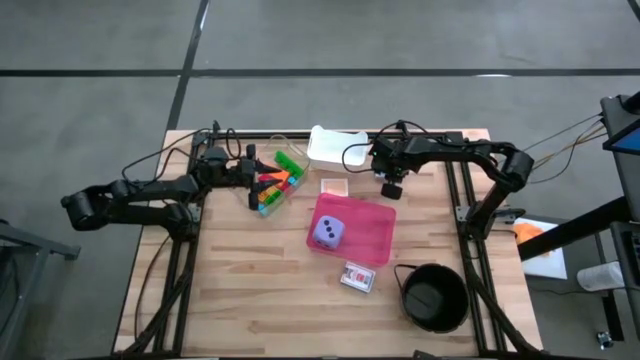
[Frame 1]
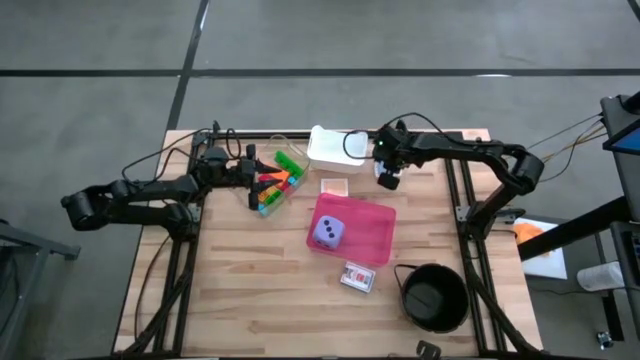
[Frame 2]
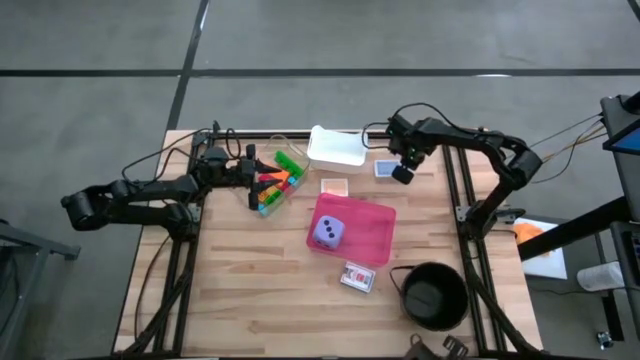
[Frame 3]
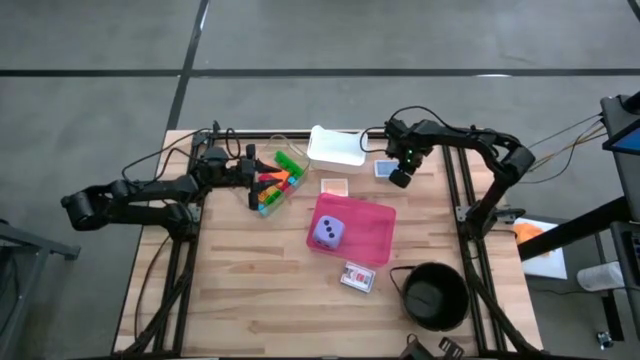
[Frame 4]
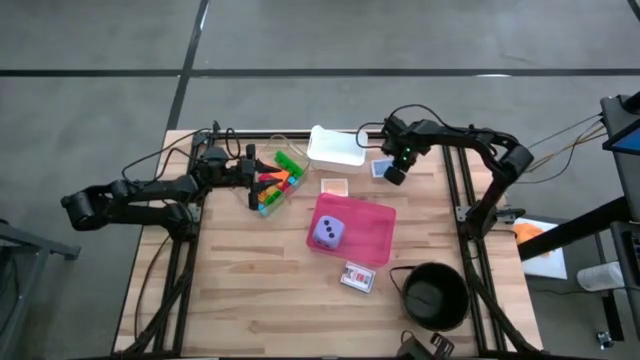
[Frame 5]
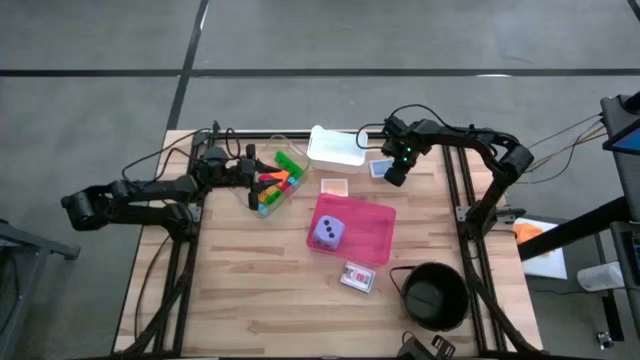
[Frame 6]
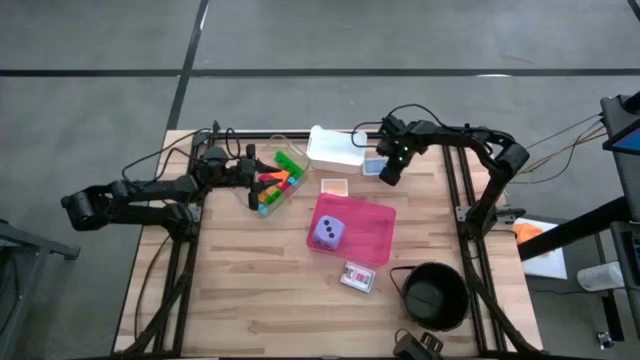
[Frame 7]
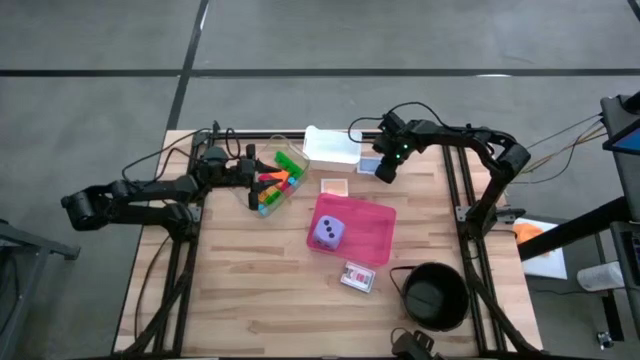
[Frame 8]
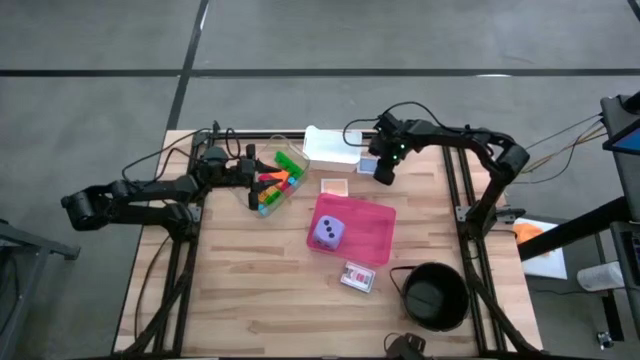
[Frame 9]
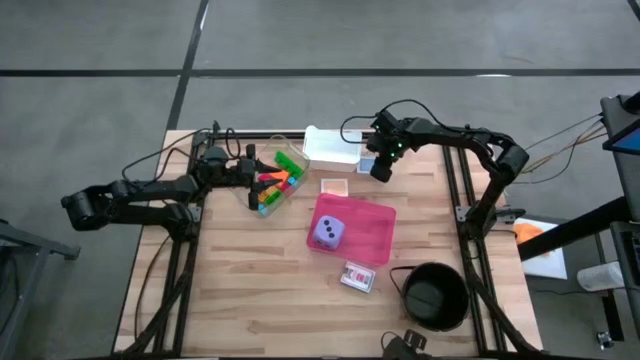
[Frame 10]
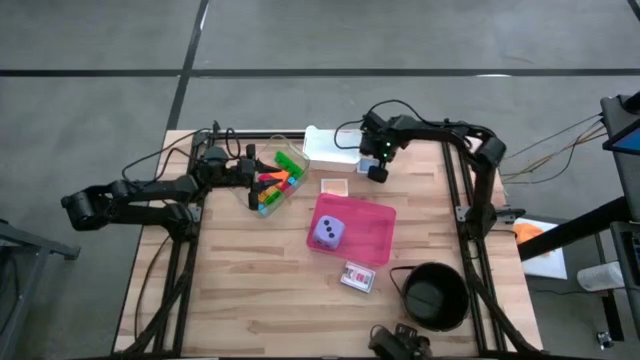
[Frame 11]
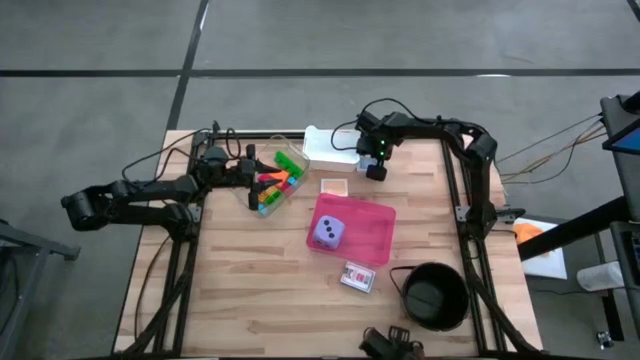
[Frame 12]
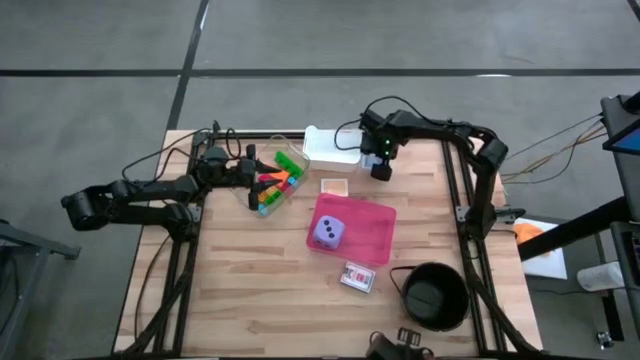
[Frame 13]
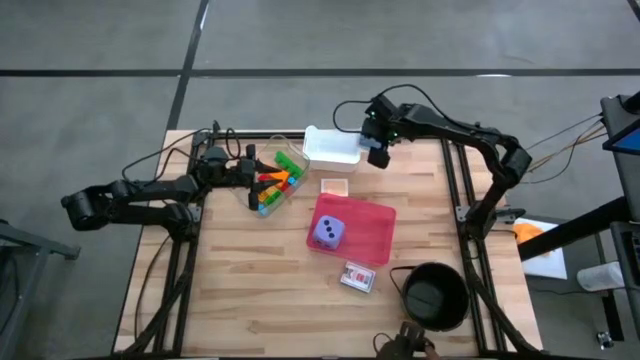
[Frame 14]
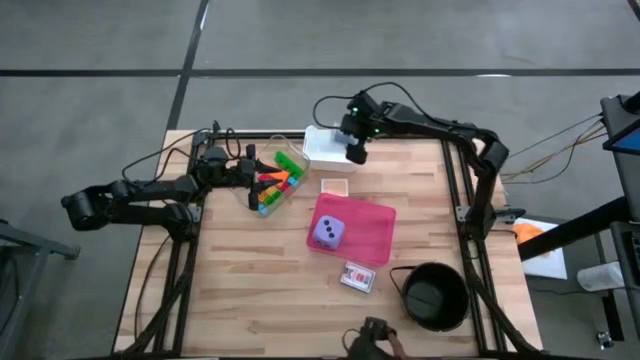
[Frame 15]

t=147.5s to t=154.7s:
Task: Pick & Place Toys
Put the blue playing card into the white bin

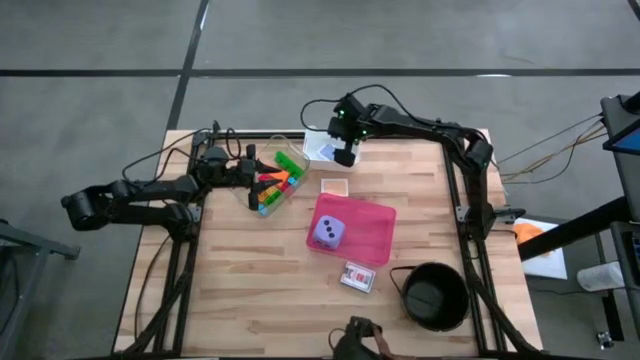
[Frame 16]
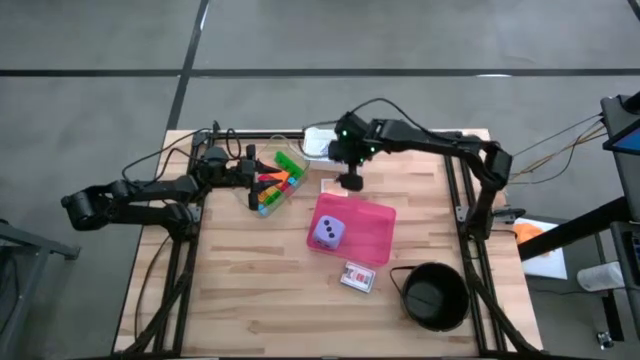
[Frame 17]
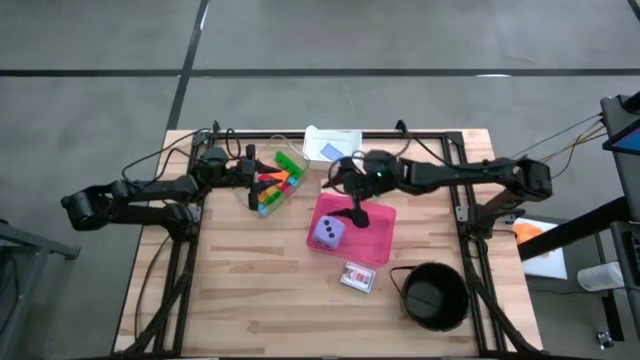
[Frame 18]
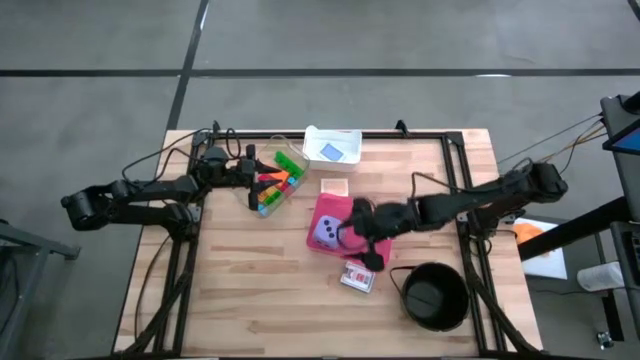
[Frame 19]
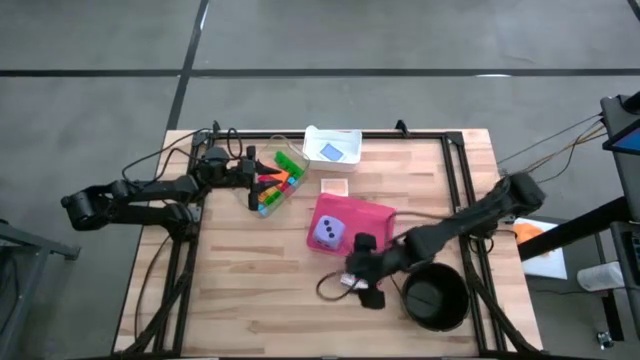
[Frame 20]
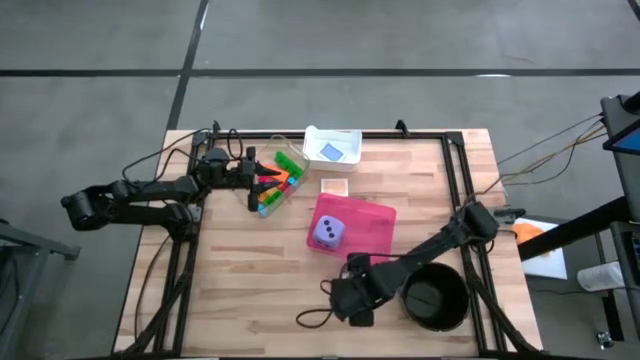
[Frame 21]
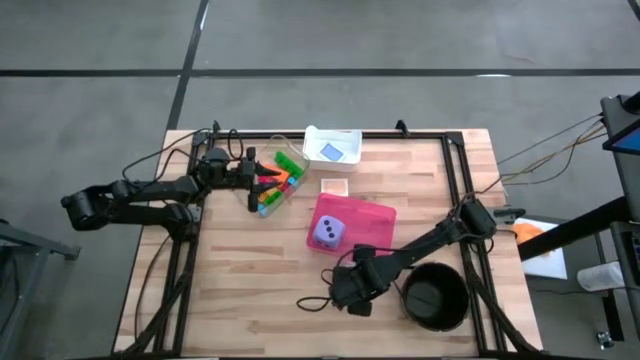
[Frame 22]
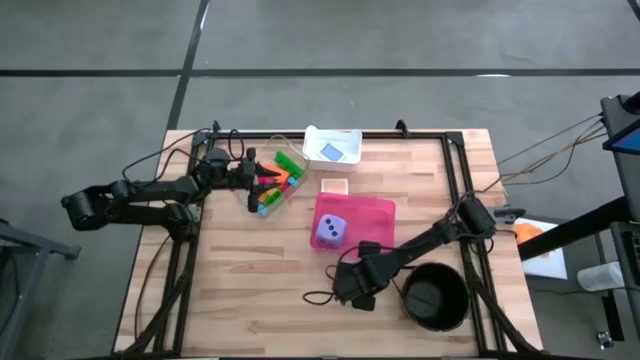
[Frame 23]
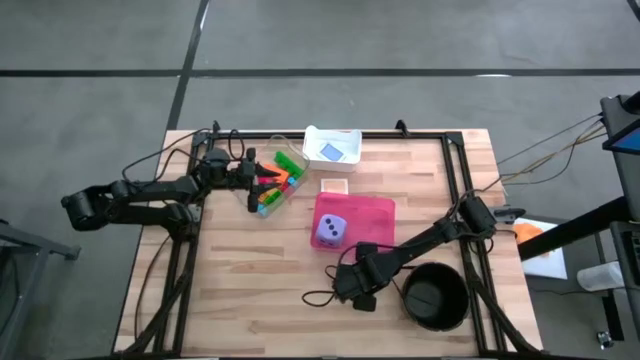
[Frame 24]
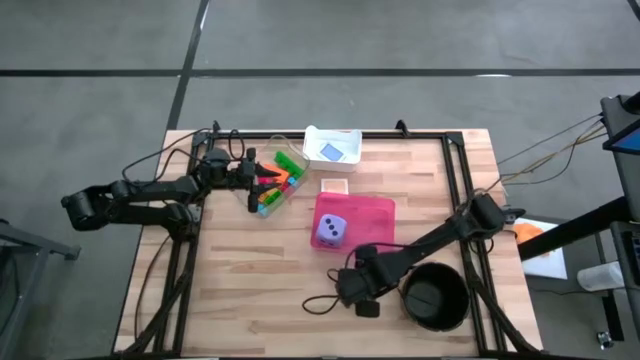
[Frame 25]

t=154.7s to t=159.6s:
Put the white playing card into the white bin

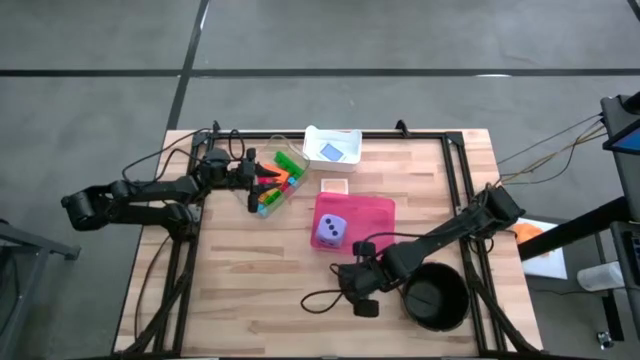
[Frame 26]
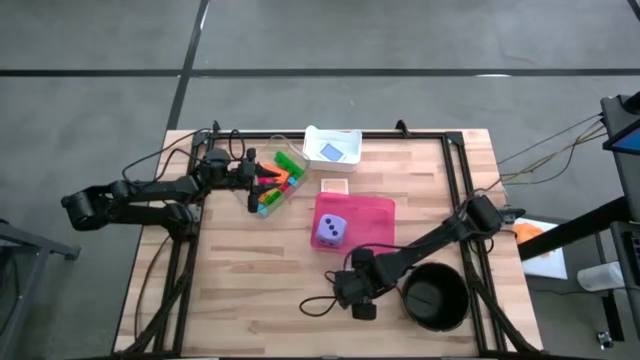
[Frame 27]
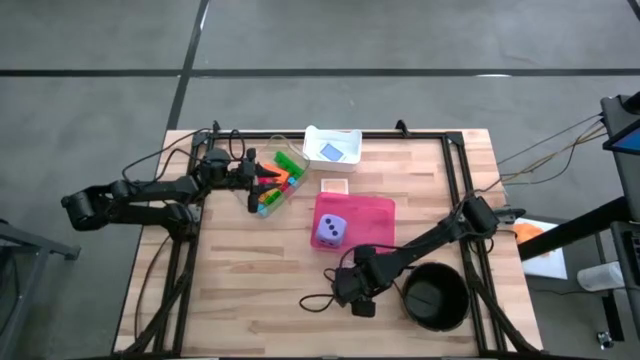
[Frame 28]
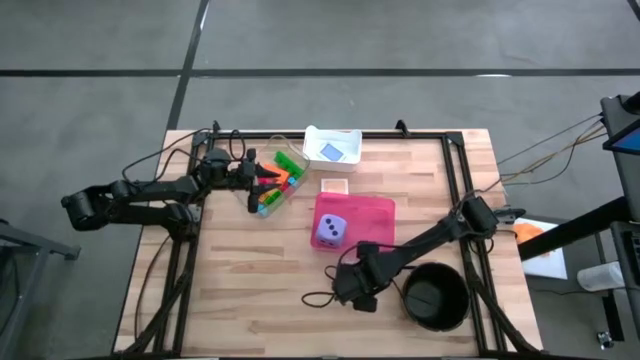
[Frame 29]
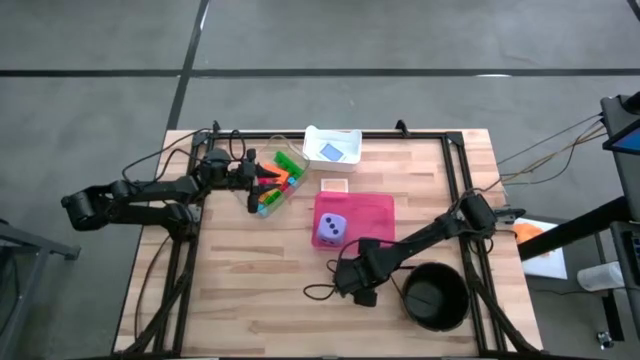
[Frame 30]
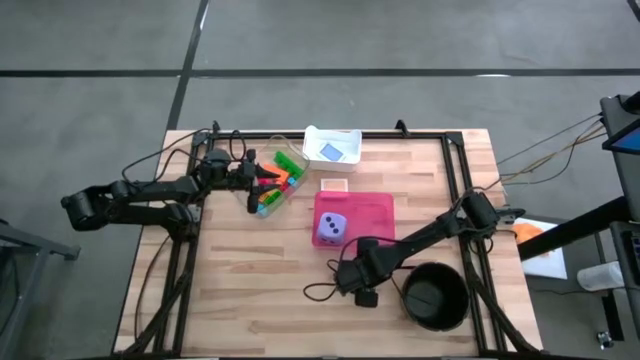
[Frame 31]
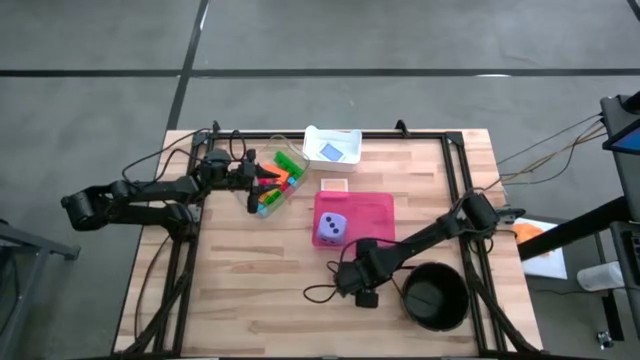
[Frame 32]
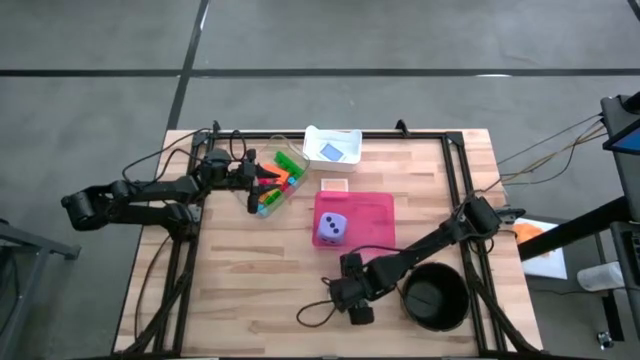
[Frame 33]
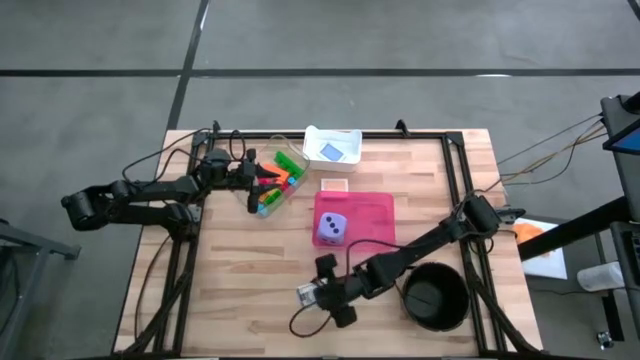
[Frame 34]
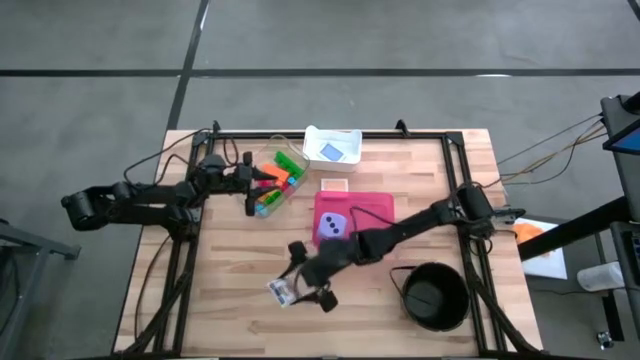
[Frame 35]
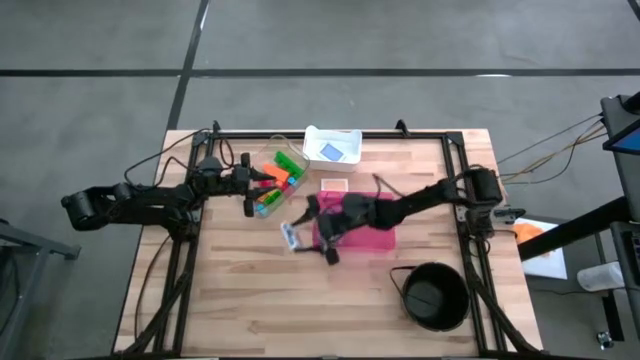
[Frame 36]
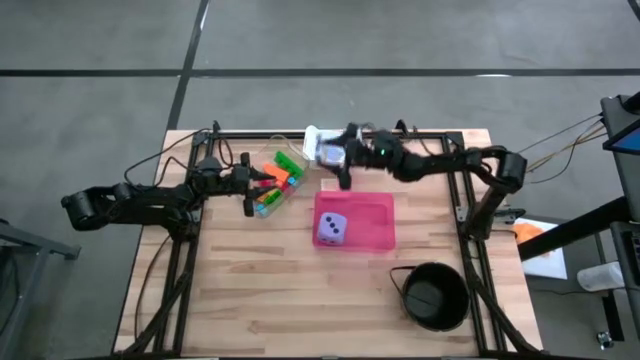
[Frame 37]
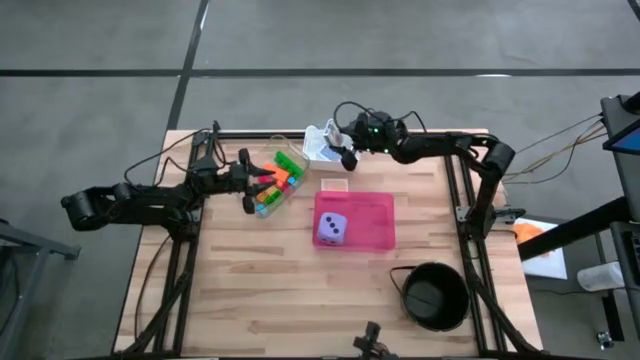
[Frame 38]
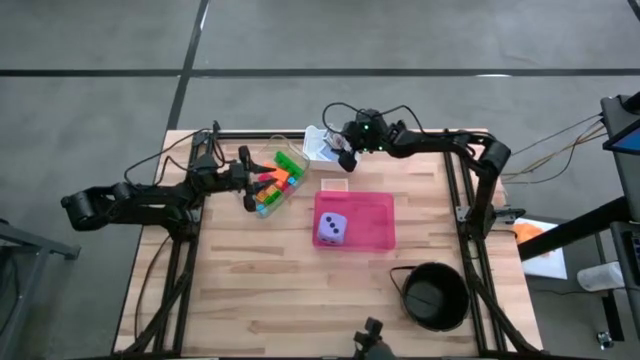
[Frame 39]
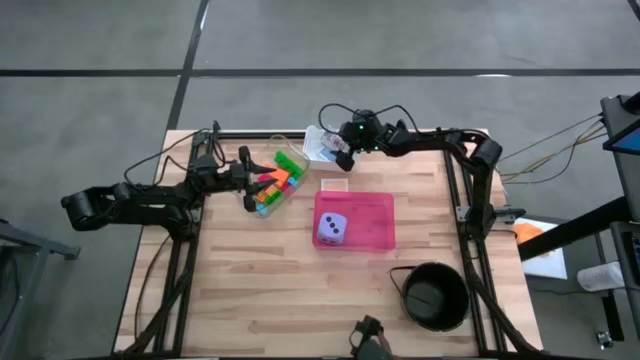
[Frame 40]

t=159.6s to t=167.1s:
Put the white playing card into the white bin

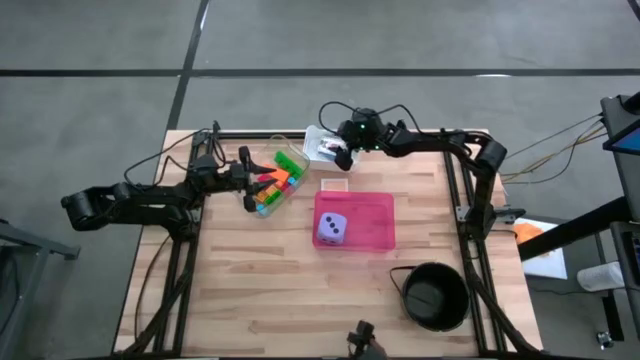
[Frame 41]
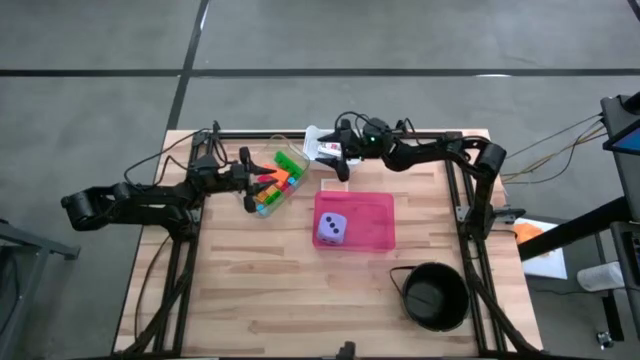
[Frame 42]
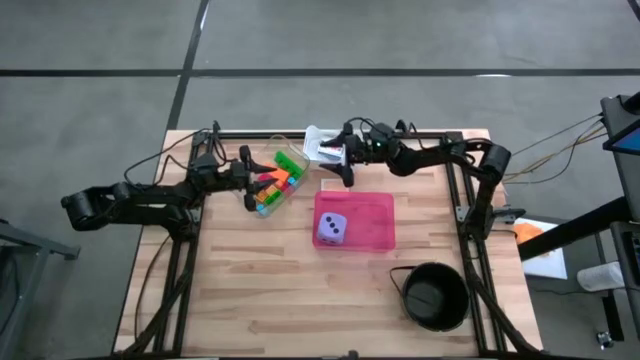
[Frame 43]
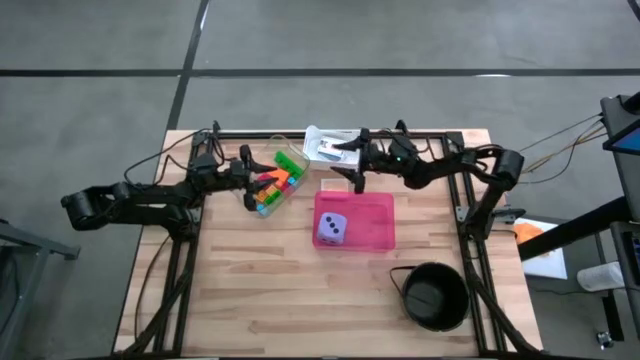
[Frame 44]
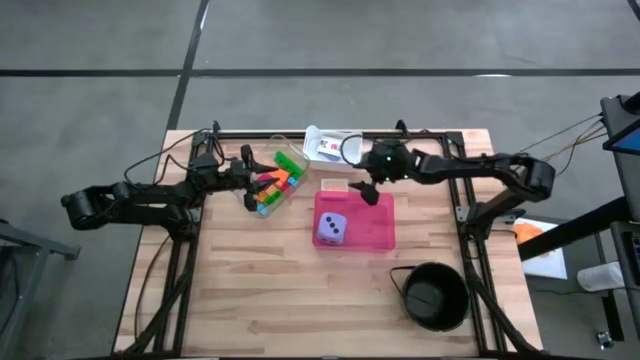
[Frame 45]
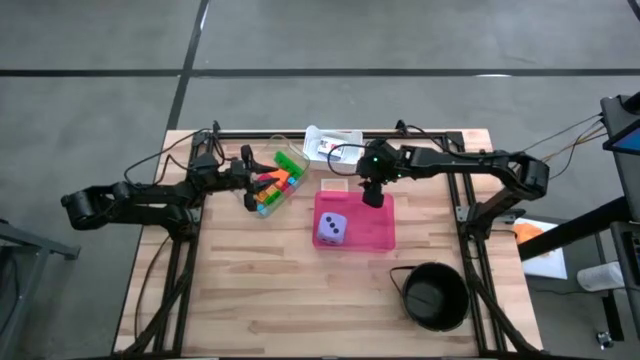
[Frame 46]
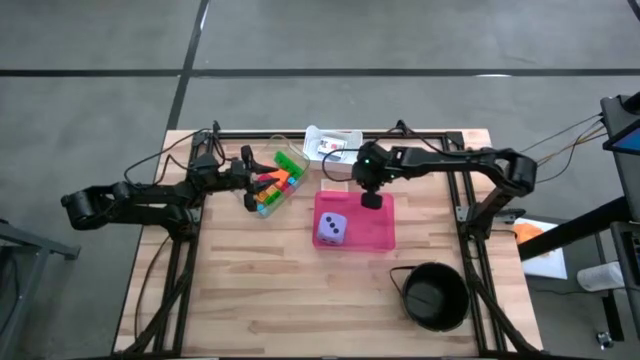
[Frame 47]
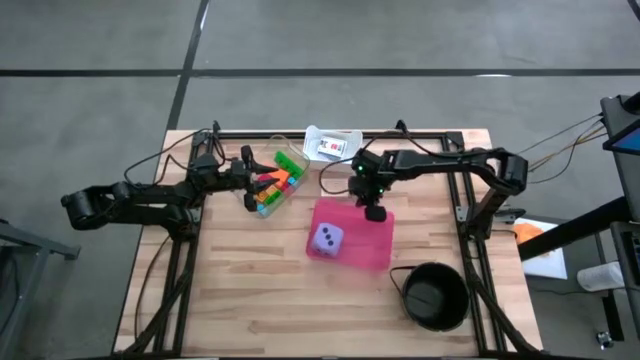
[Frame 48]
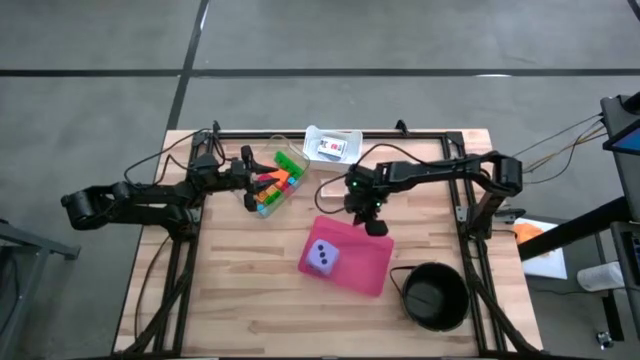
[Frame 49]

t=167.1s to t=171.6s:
Adjust the pink bin
